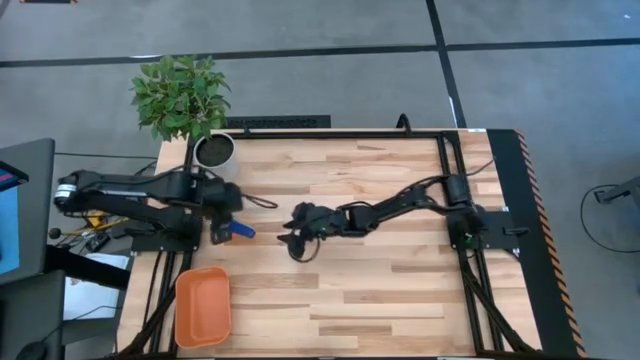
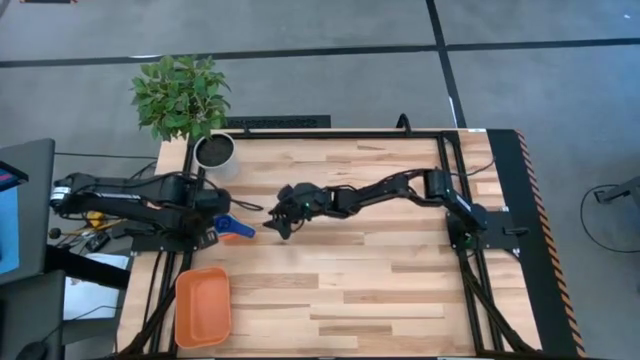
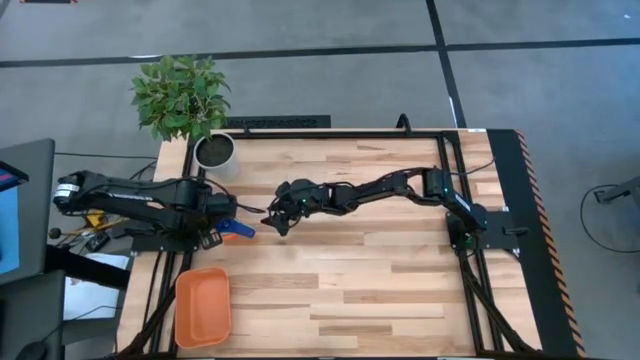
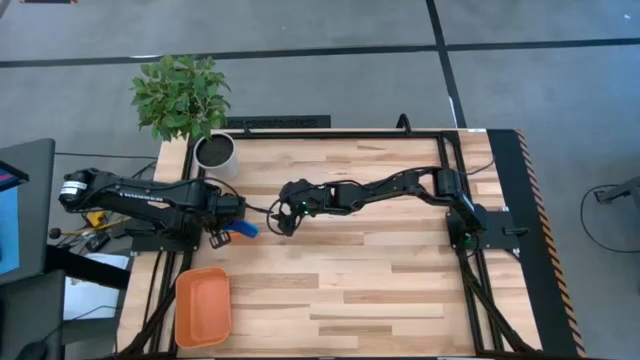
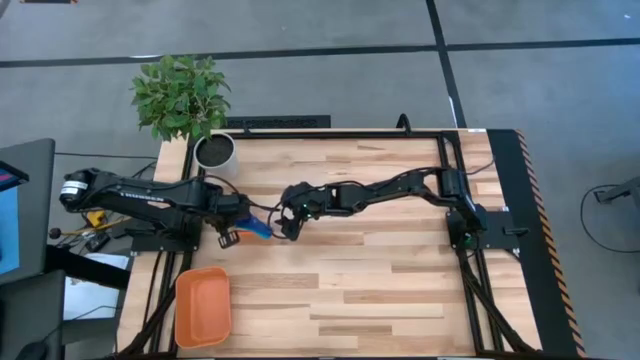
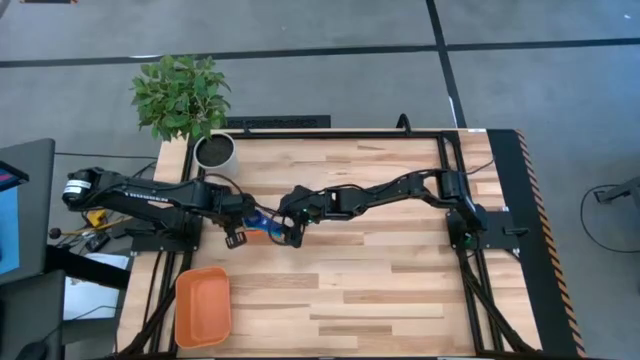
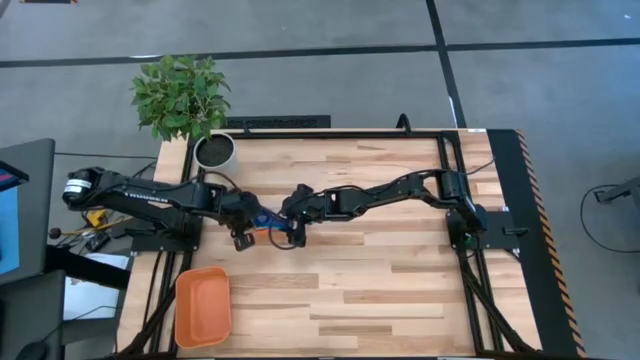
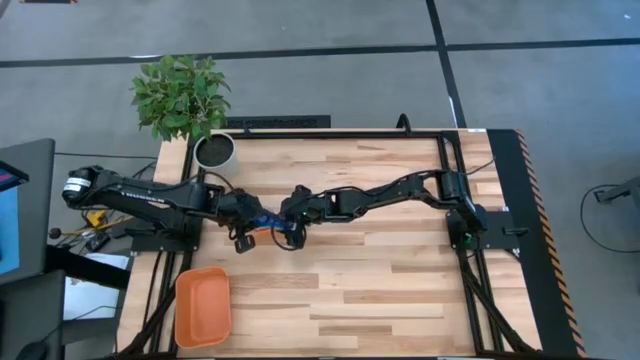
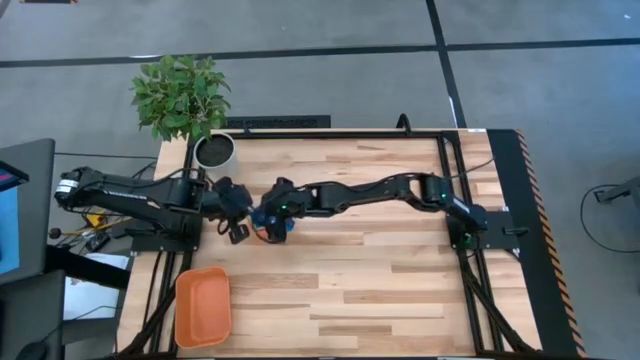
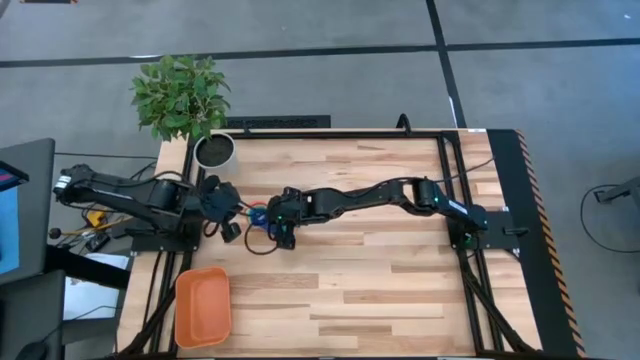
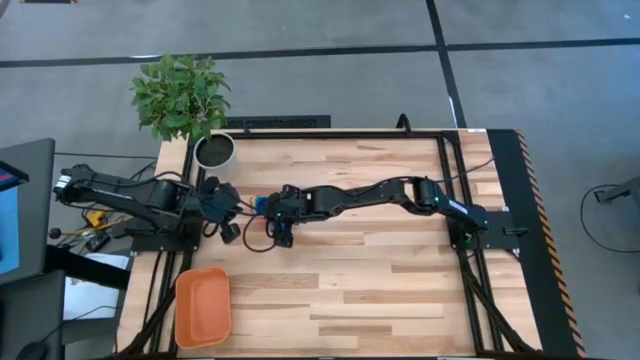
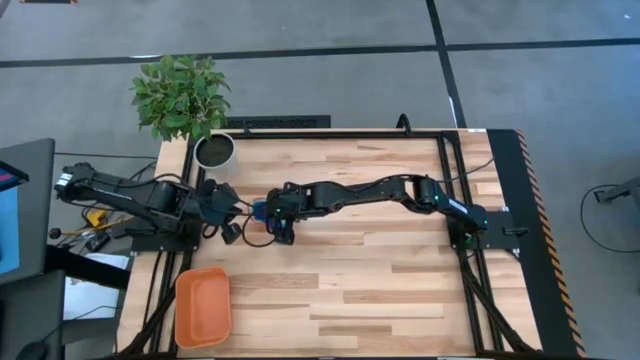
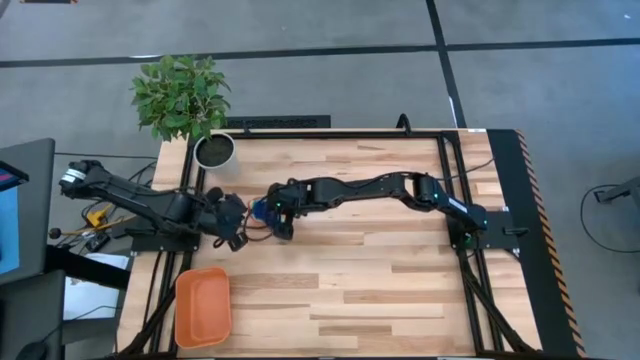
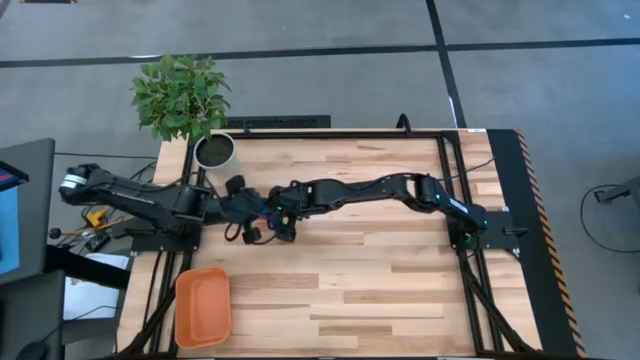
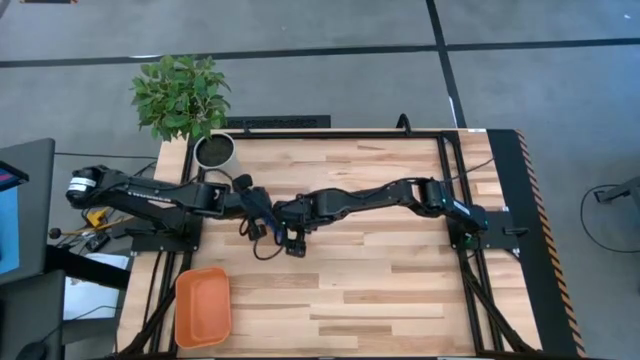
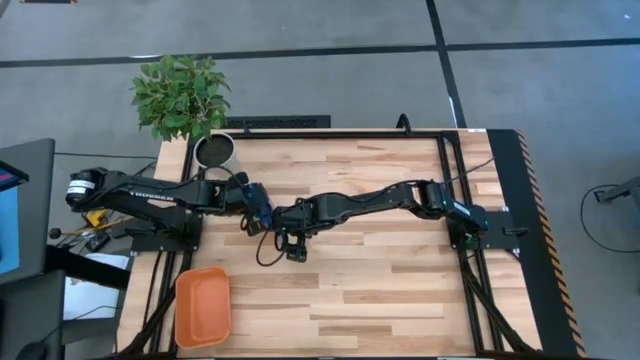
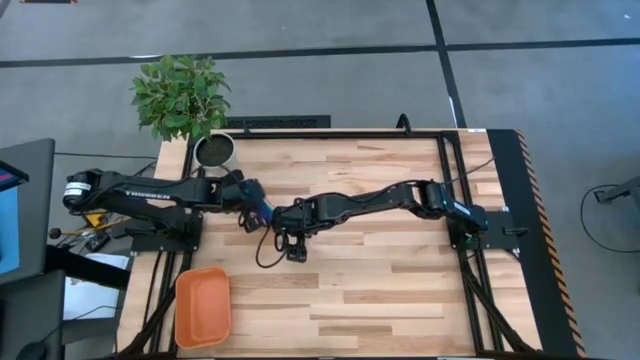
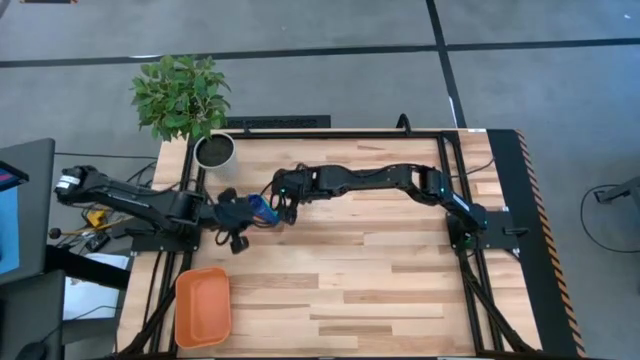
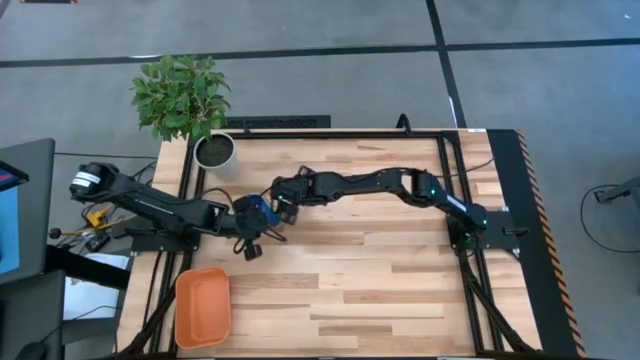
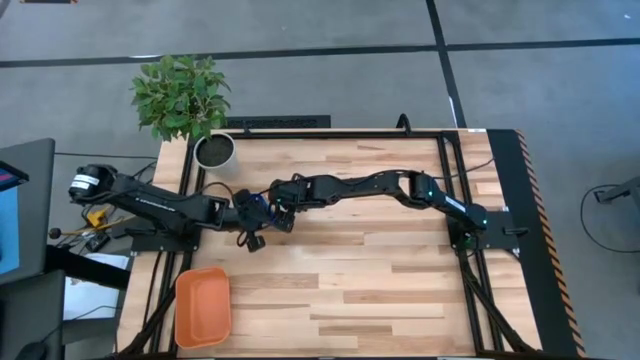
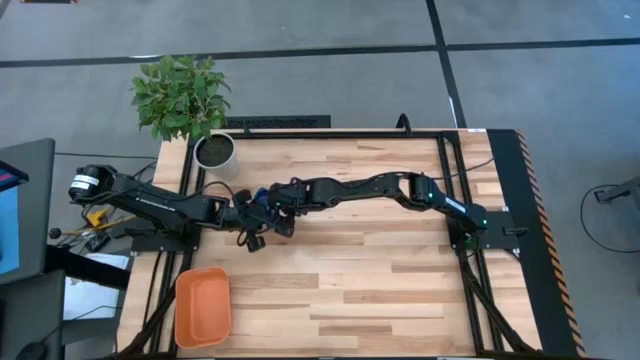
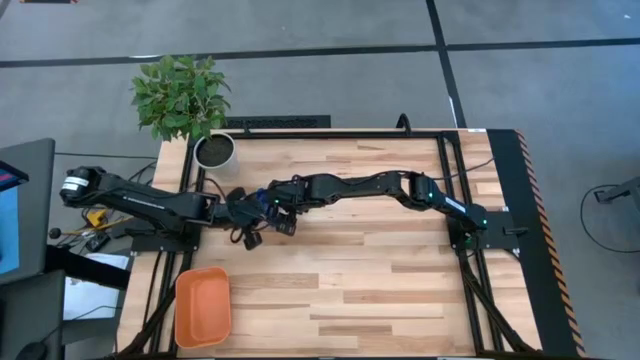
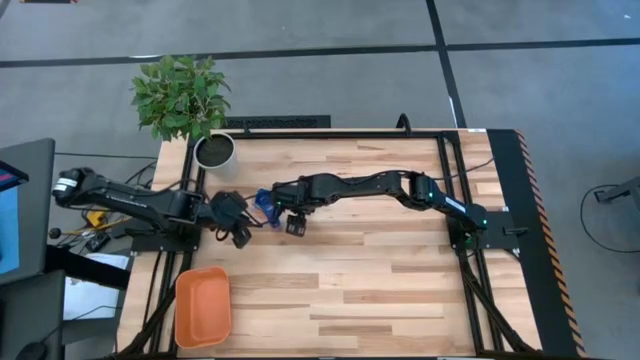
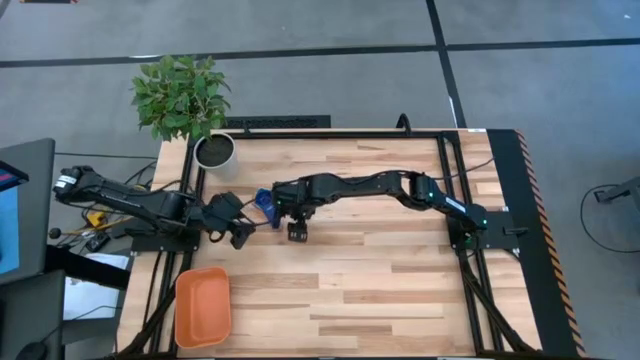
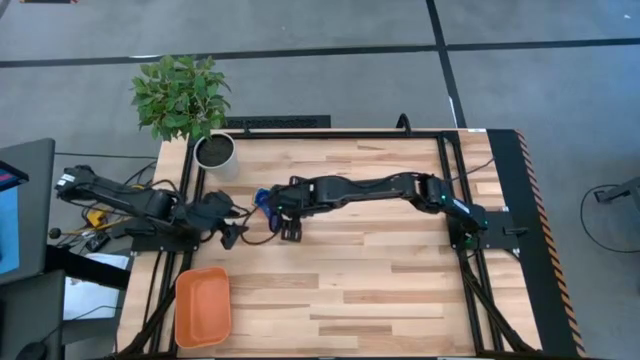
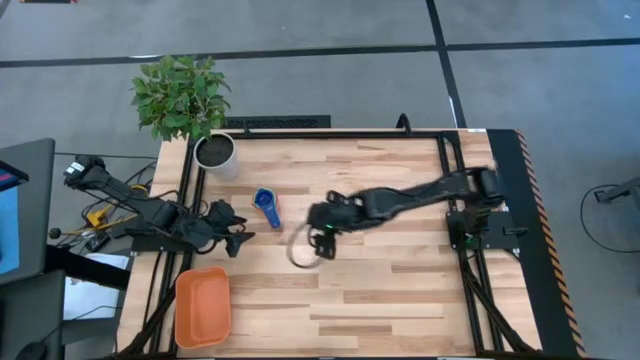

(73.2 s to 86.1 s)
Task: Nest measuring cups in basket
Put the nested measuring cups into the orange bin

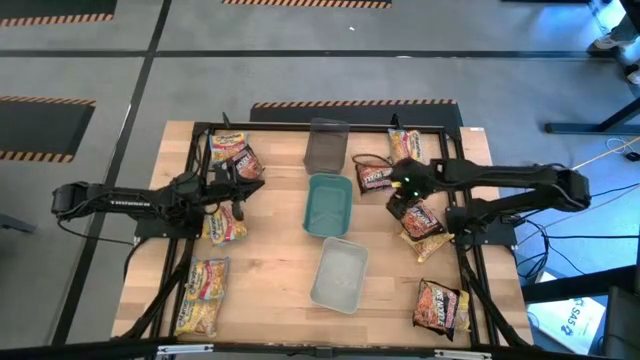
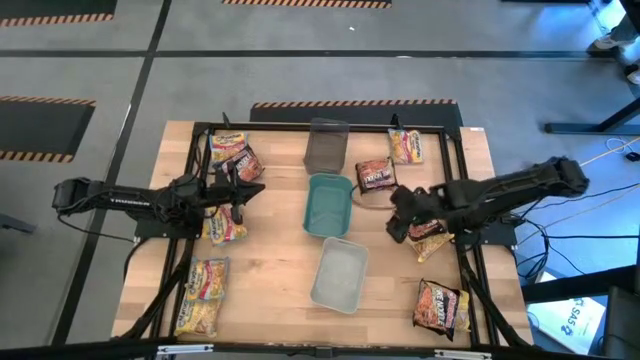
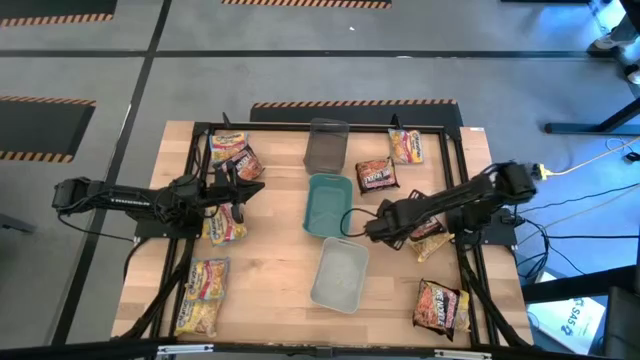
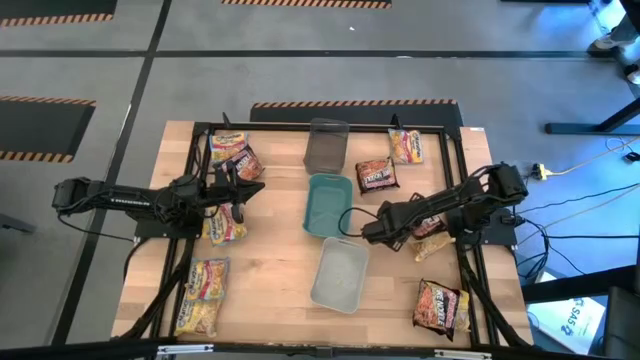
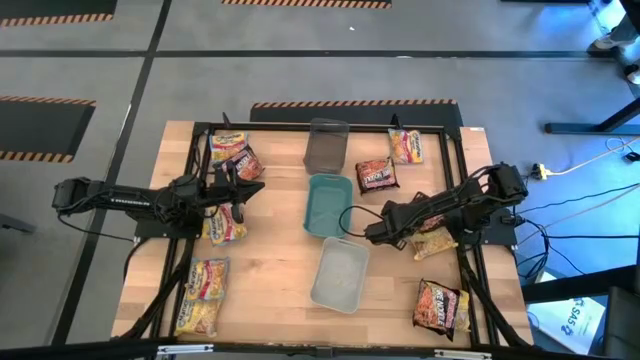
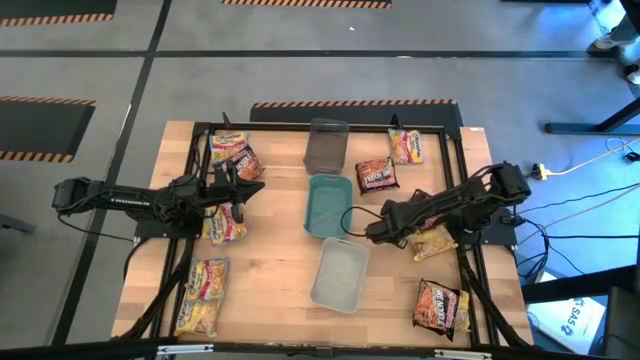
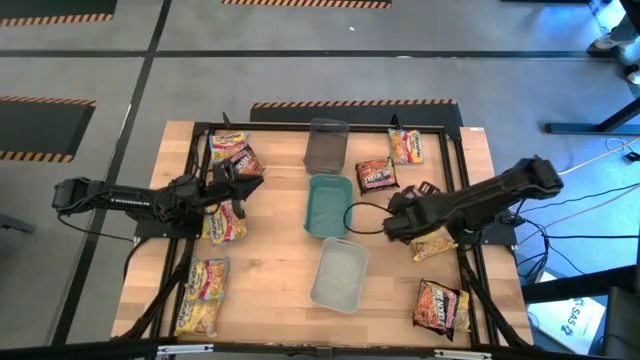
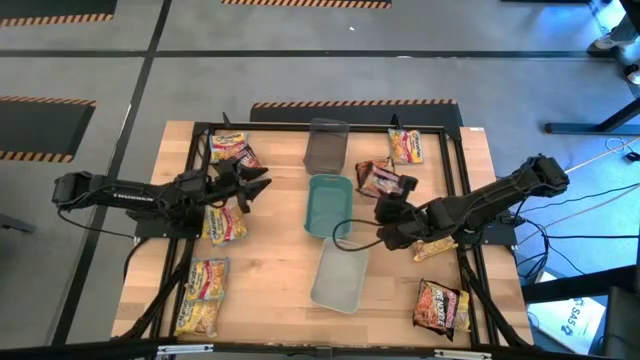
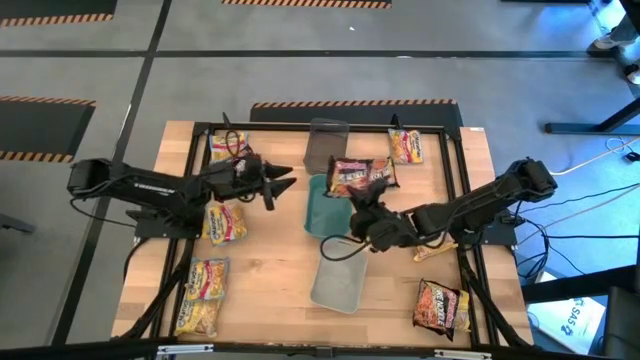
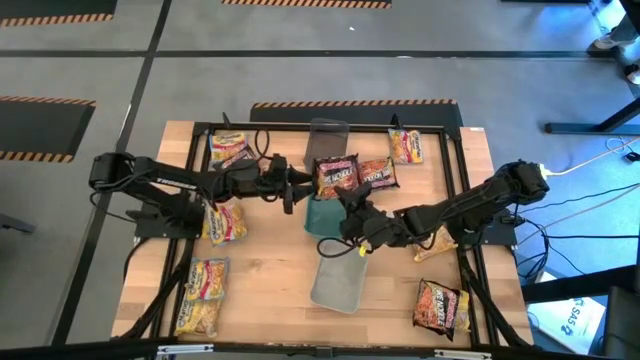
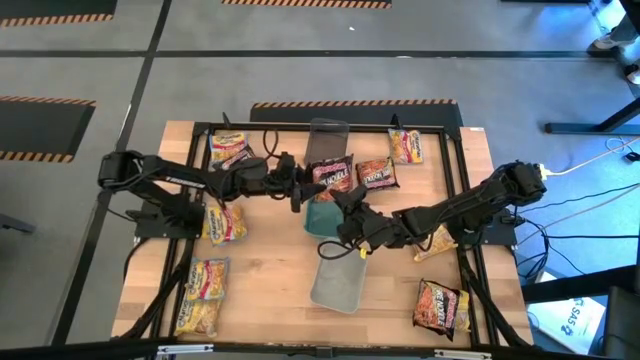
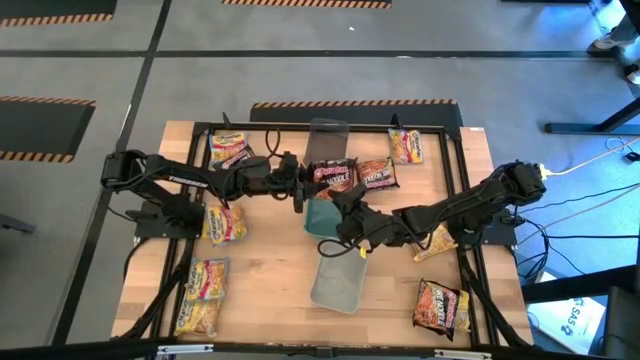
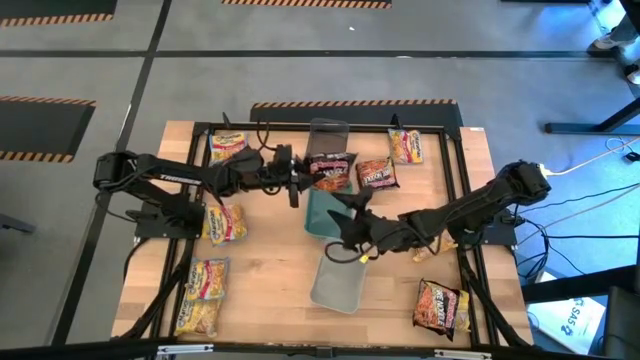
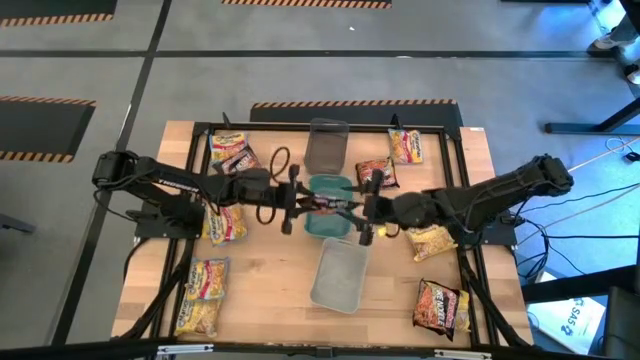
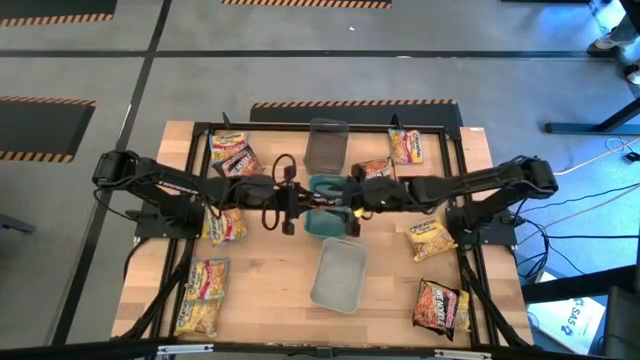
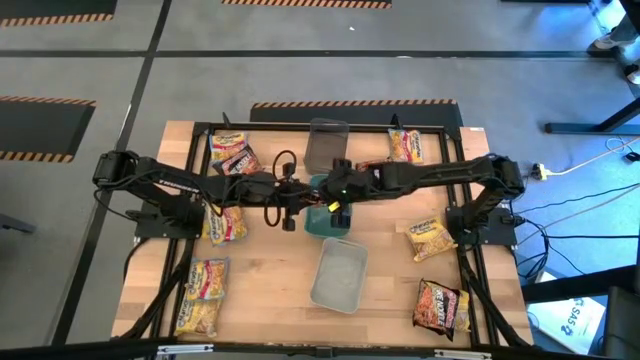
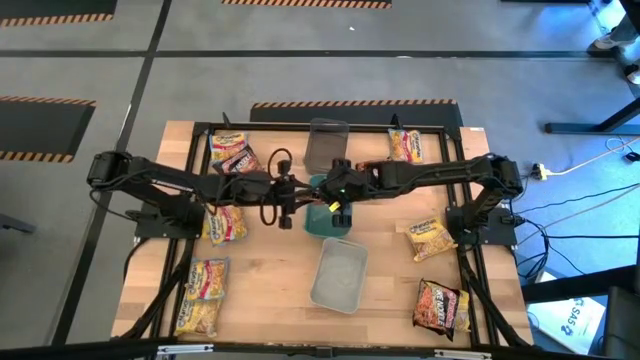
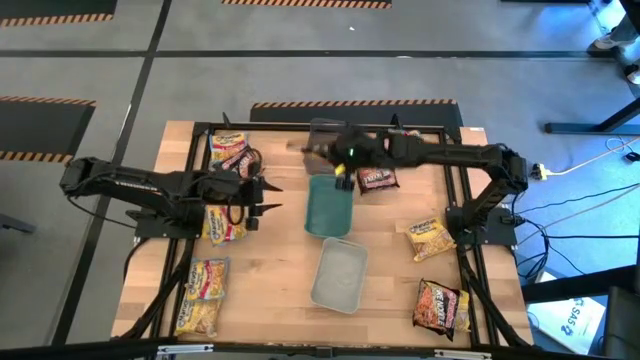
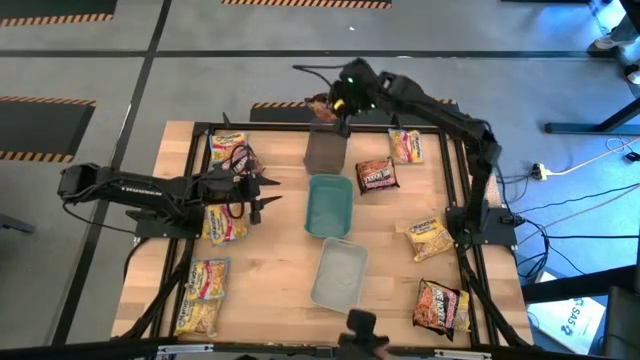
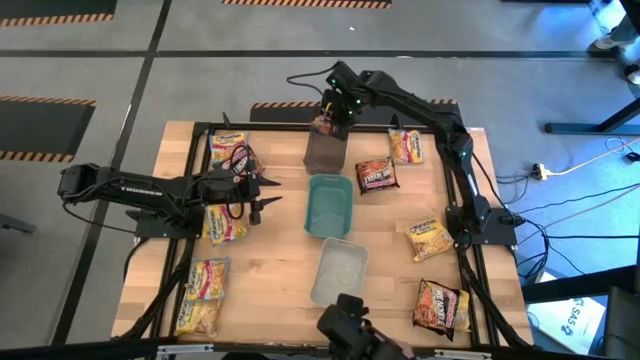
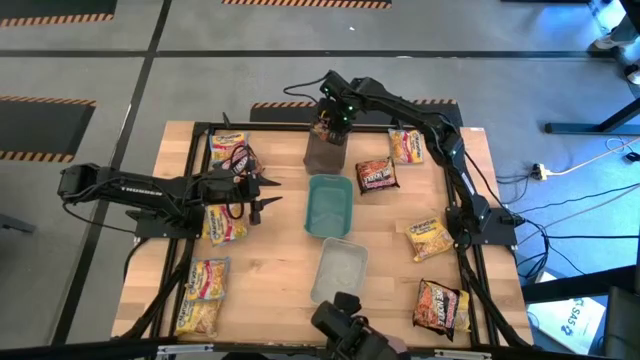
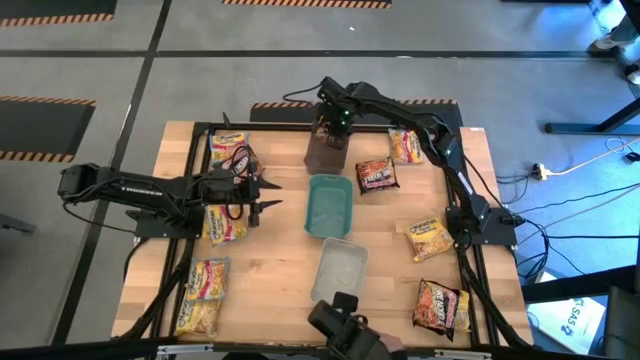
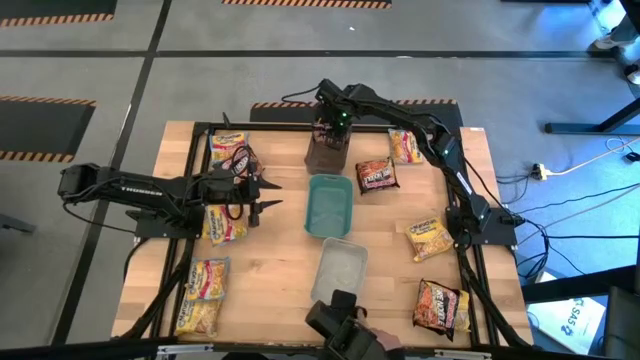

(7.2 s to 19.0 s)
Task: Sort Maruchan noodles
Put the black noodle pack into the black bin
